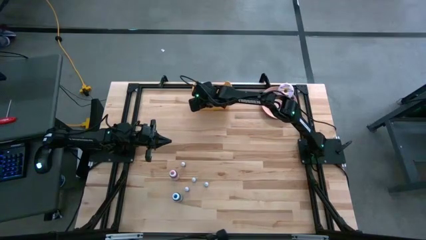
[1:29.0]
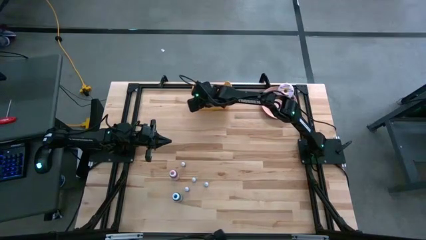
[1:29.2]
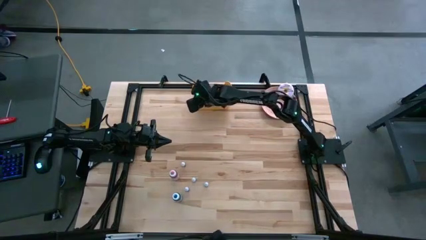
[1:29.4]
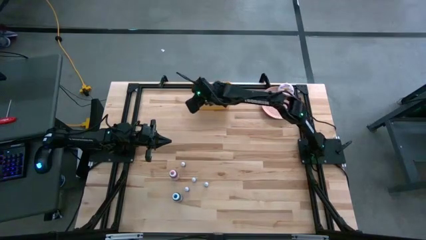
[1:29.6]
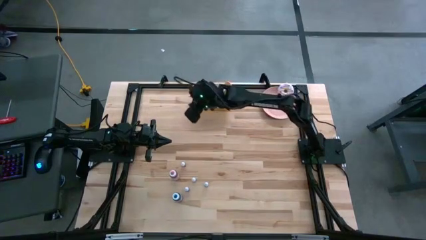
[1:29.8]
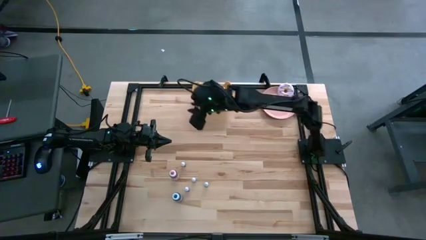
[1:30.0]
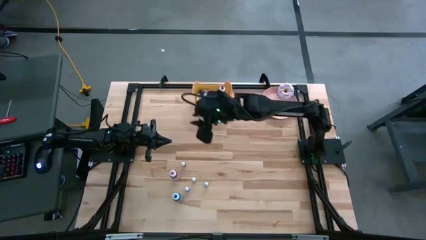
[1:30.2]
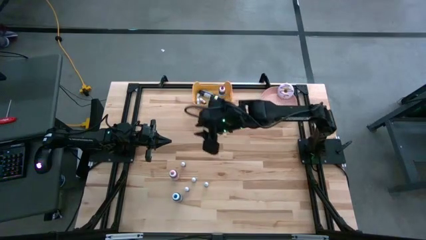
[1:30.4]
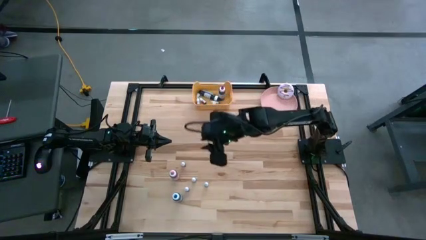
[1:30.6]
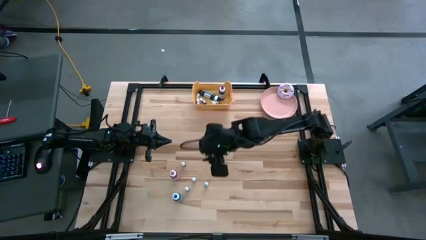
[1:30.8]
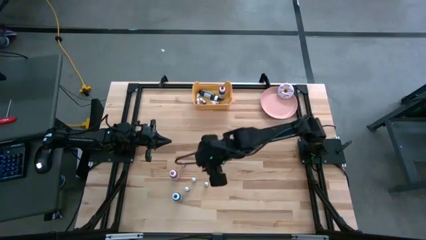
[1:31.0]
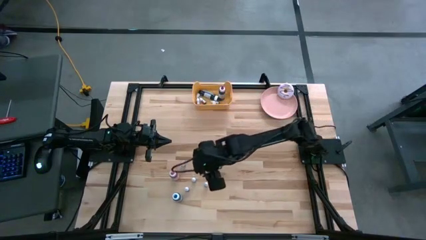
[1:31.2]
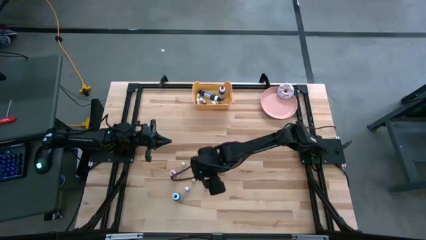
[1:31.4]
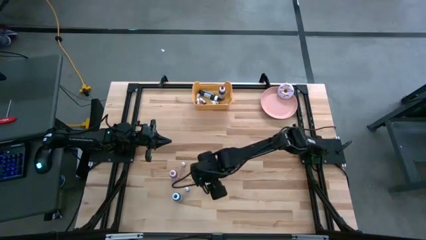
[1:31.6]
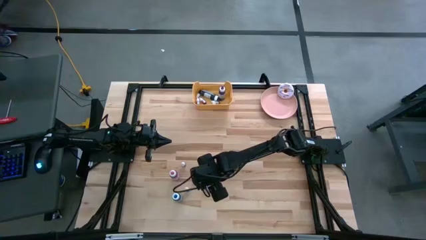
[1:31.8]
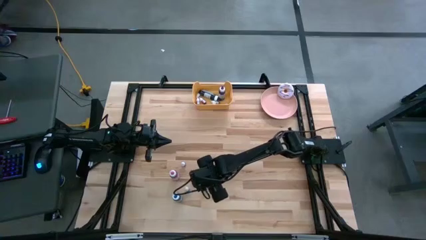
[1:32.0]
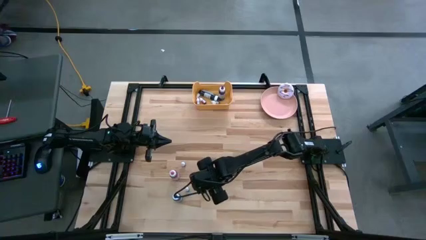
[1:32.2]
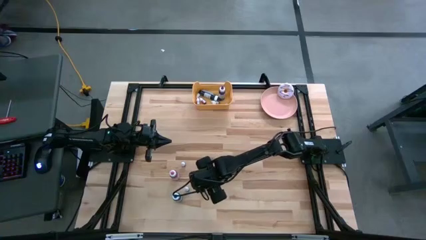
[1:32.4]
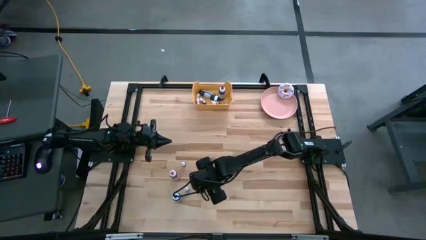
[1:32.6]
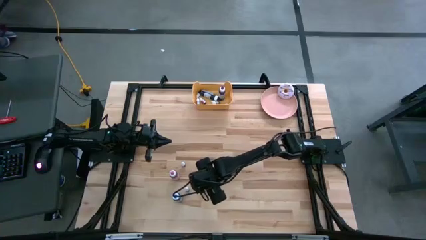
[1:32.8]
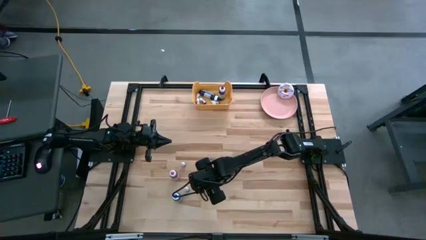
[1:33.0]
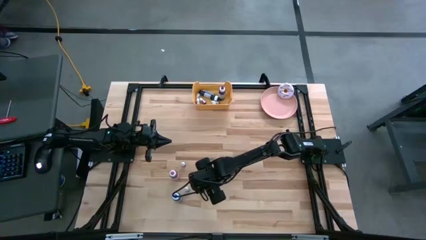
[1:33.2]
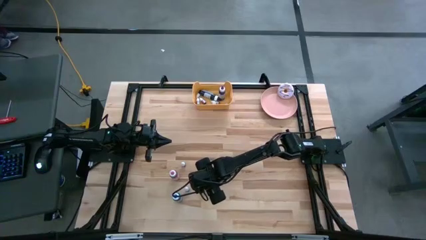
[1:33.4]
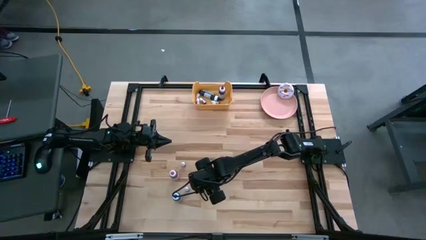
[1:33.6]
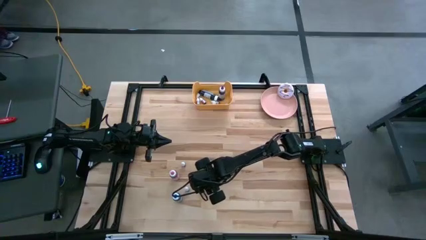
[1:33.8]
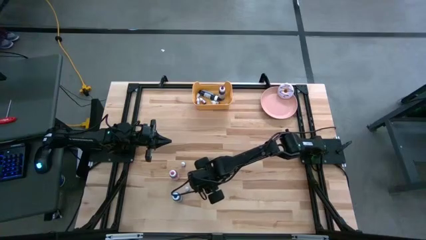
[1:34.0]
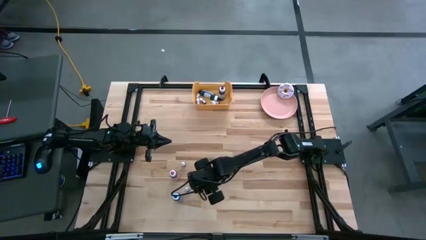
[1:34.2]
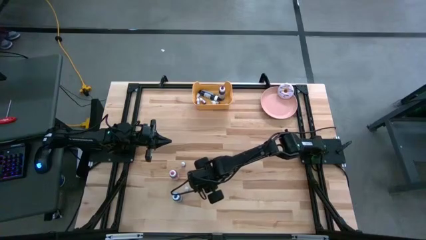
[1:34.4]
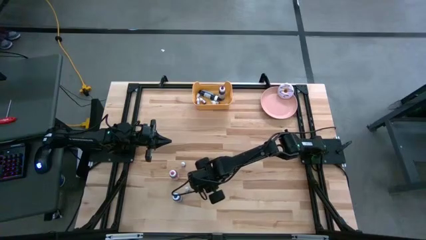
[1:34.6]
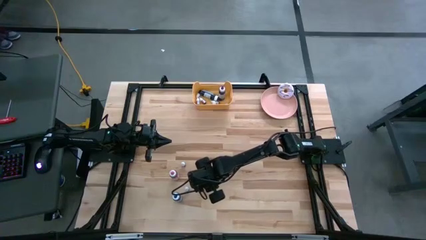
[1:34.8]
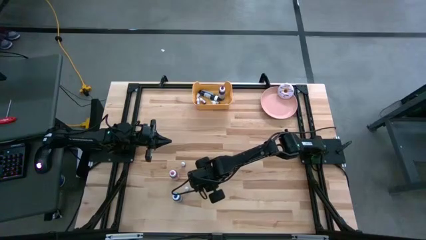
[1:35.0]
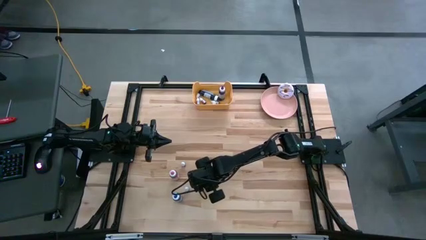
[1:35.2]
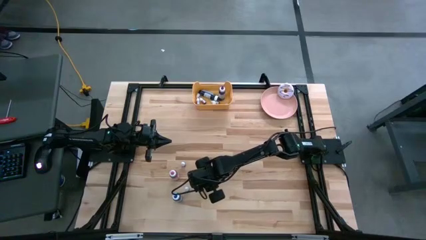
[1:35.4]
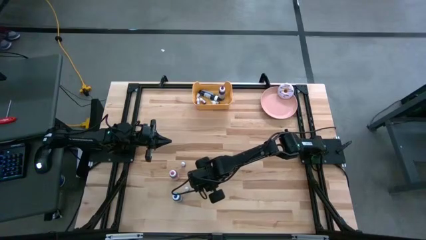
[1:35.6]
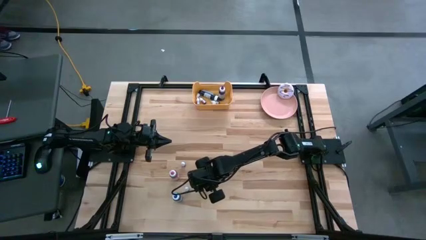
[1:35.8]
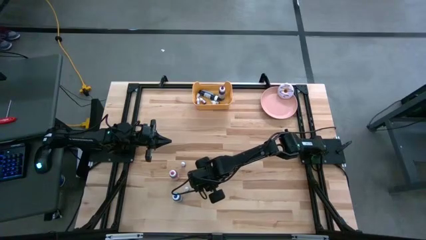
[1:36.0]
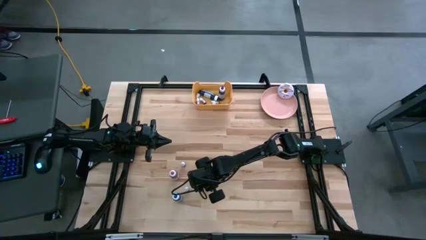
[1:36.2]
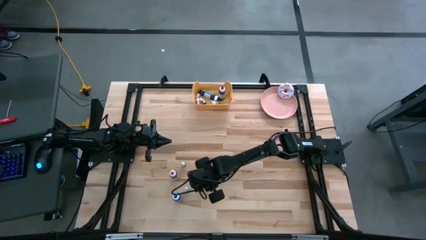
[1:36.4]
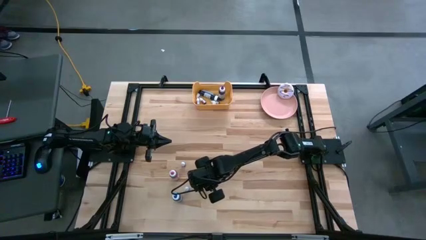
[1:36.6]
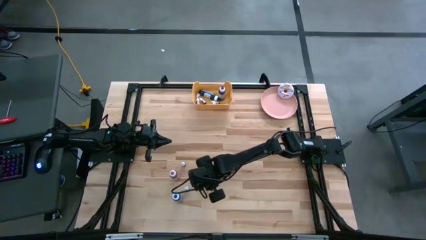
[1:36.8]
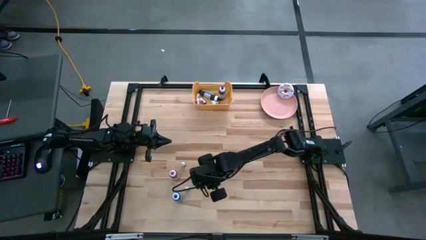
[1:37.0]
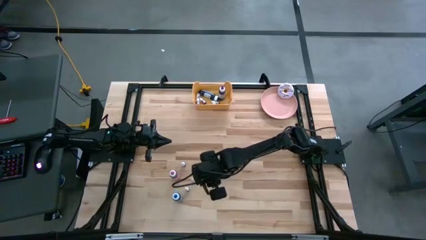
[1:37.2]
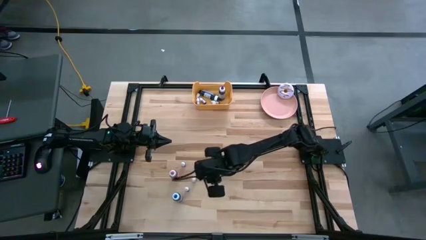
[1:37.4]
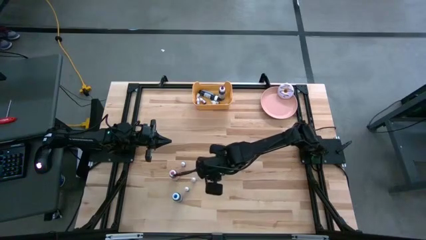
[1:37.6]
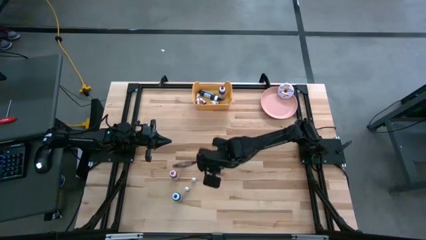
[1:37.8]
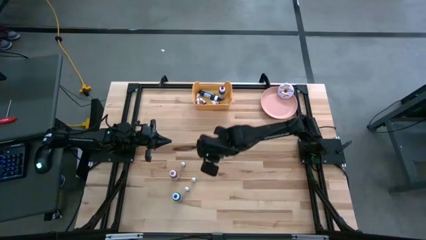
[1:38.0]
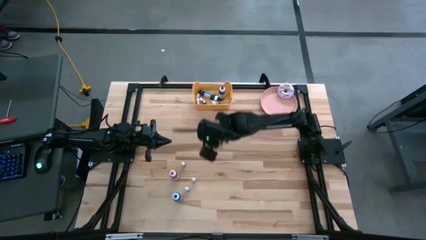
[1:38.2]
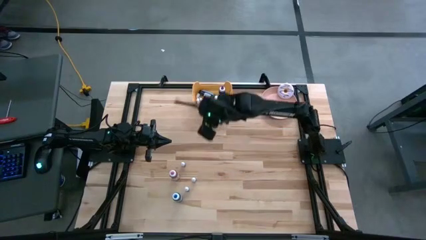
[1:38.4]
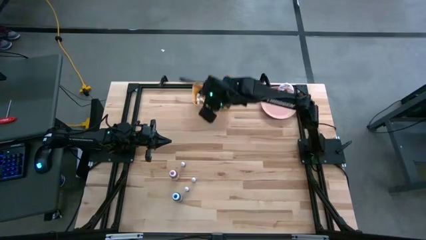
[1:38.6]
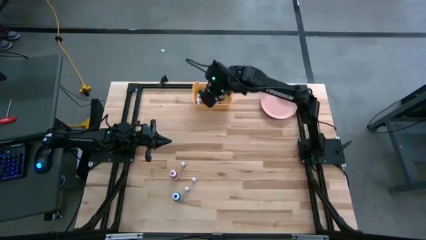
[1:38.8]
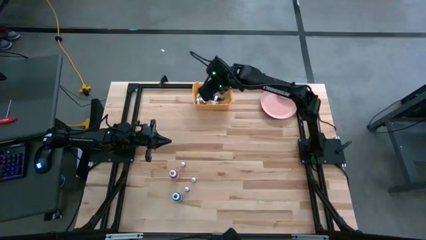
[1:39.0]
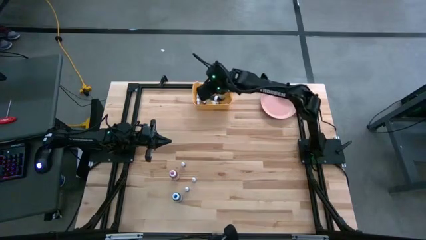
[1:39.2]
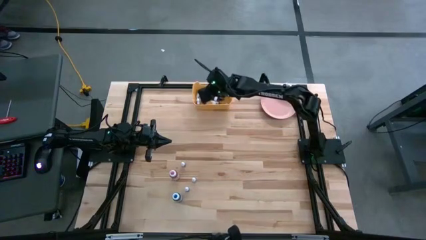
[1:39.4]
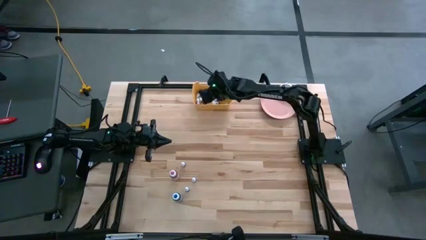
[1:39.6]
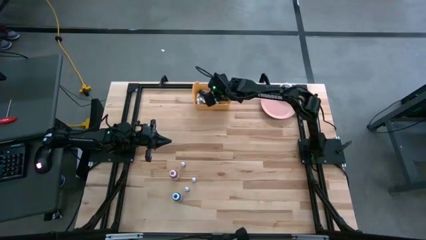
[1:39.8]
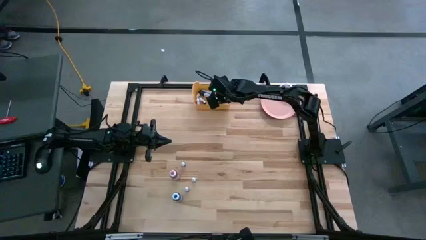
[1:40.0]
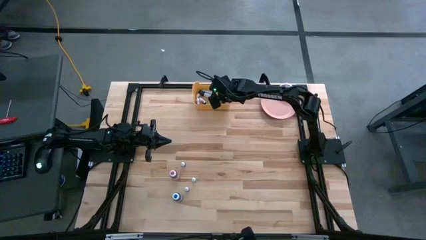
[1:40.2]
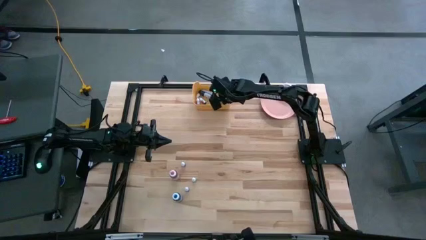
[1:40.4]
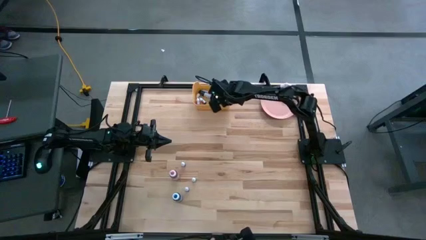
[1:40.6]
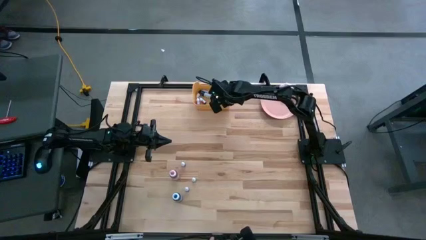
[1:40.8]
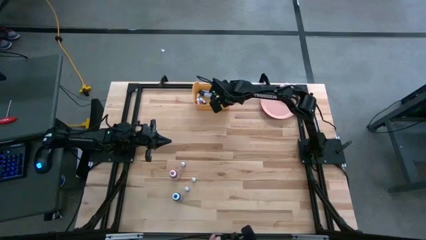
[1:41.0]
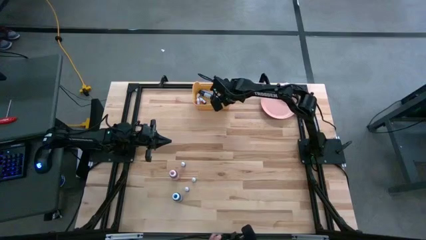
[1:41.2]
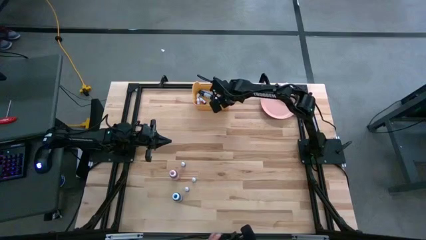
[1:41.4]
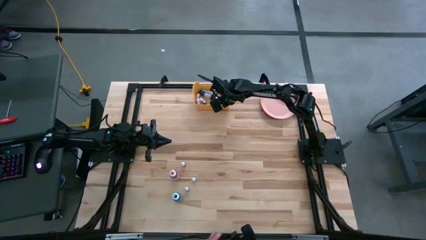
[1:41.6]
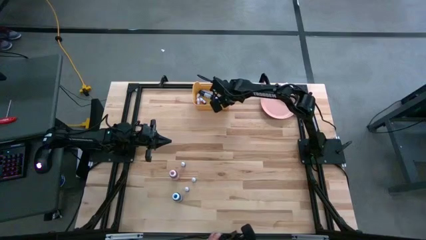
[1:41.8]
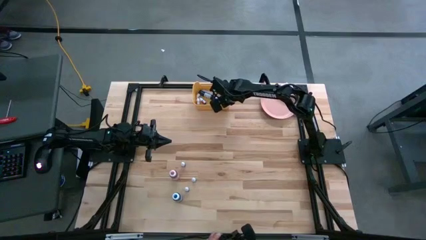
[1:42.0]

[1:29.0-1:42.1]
Task: Pick & Place food coloring
Put the small blue food coloring bottle into the yellow bin
